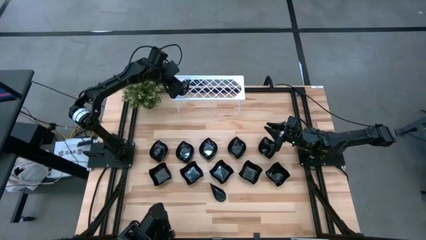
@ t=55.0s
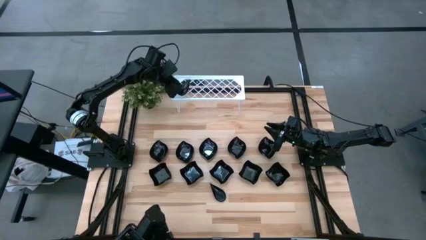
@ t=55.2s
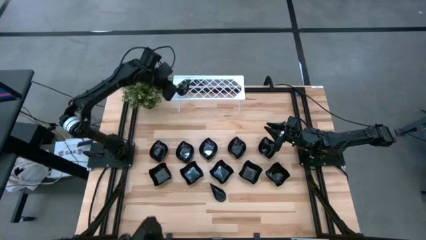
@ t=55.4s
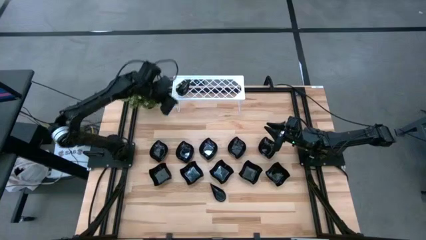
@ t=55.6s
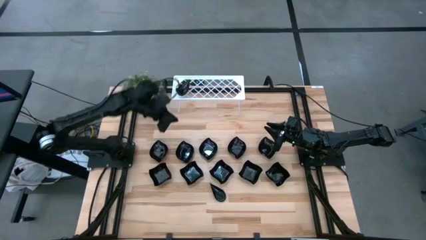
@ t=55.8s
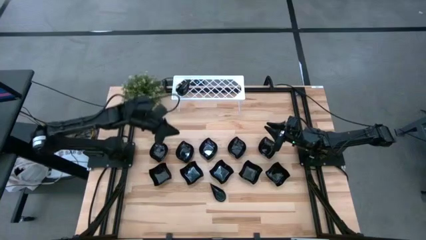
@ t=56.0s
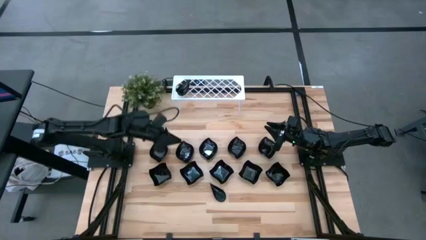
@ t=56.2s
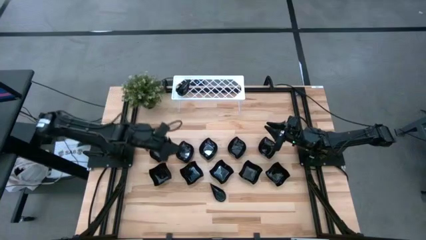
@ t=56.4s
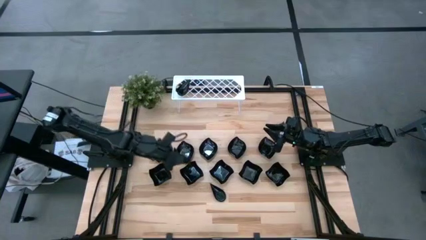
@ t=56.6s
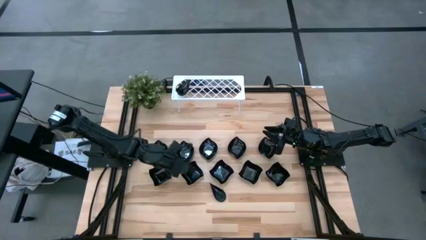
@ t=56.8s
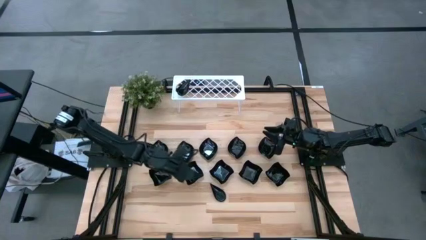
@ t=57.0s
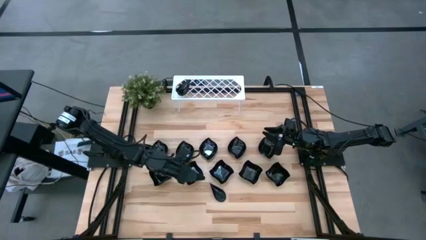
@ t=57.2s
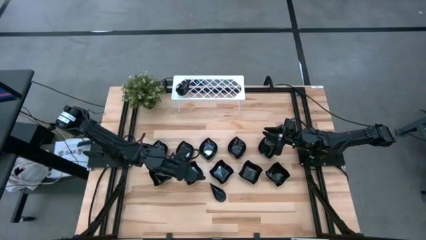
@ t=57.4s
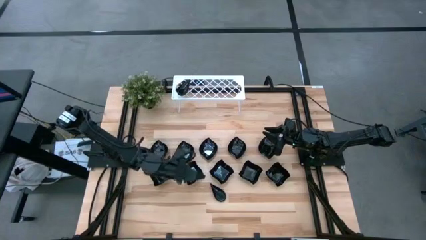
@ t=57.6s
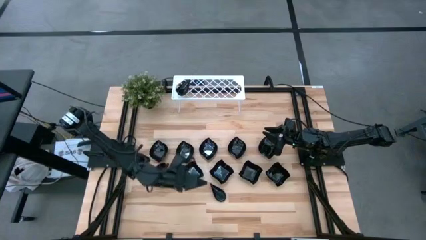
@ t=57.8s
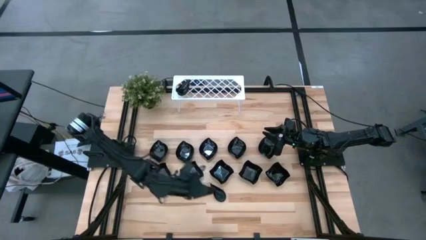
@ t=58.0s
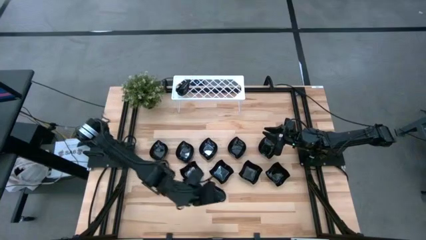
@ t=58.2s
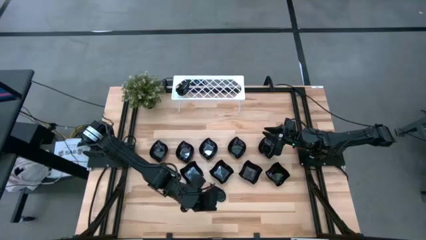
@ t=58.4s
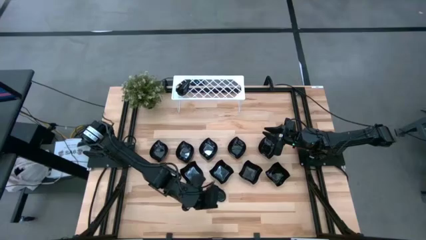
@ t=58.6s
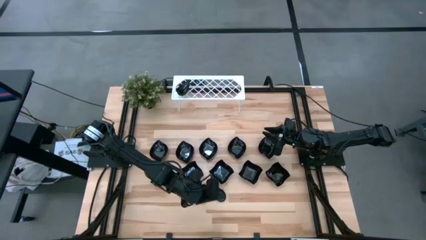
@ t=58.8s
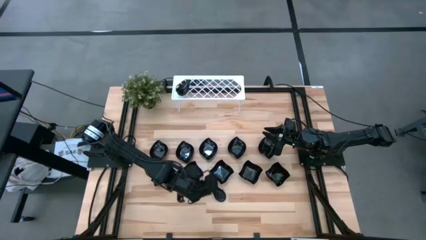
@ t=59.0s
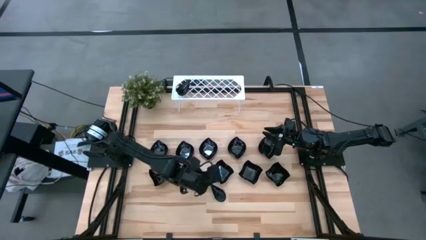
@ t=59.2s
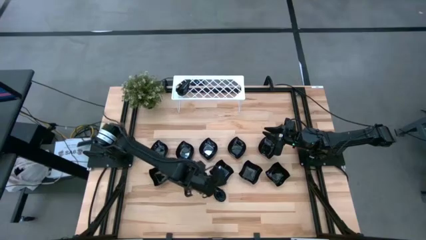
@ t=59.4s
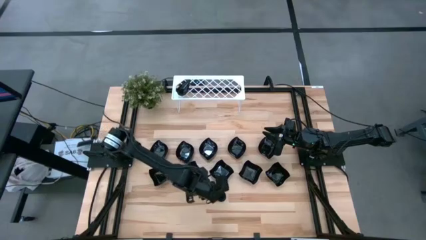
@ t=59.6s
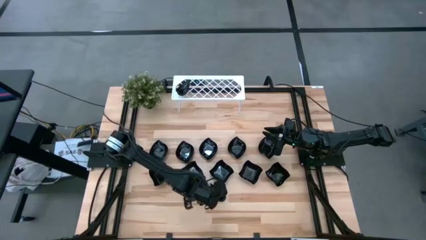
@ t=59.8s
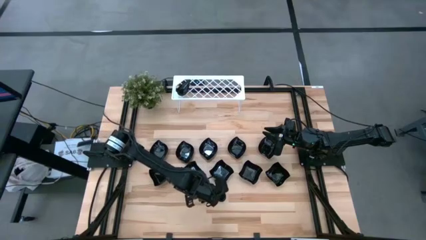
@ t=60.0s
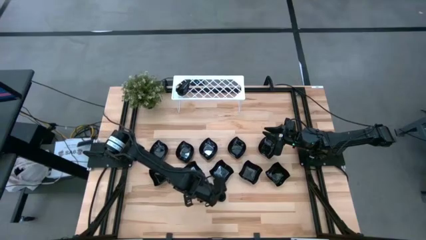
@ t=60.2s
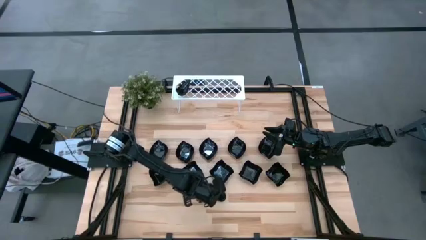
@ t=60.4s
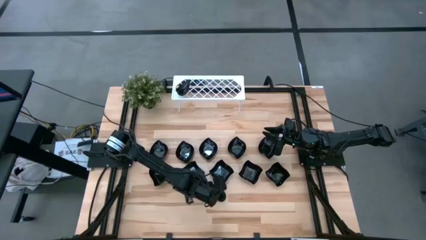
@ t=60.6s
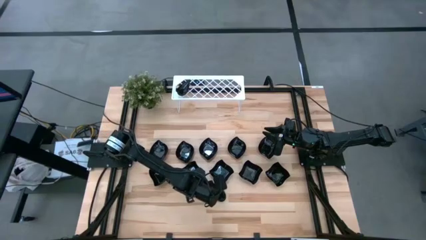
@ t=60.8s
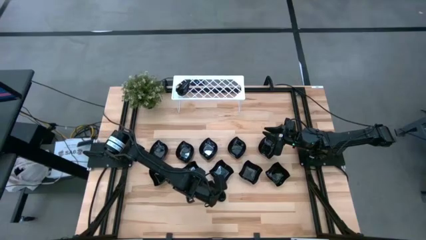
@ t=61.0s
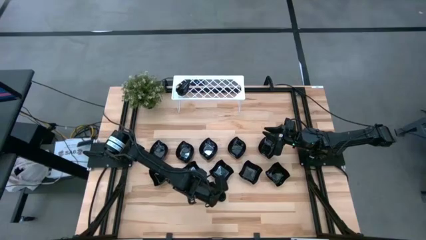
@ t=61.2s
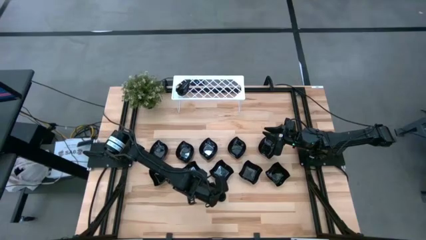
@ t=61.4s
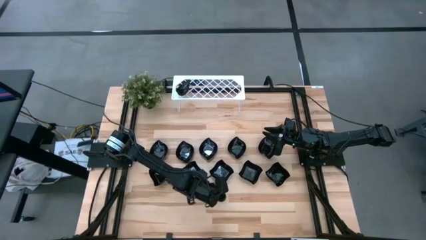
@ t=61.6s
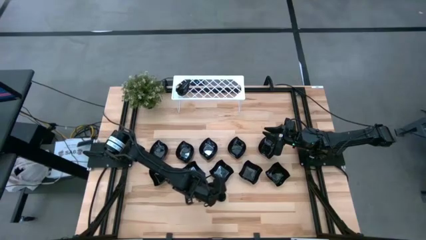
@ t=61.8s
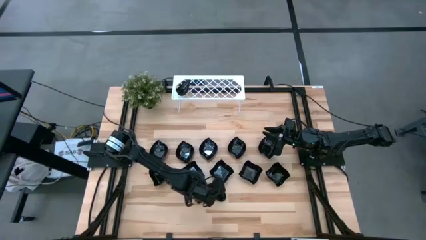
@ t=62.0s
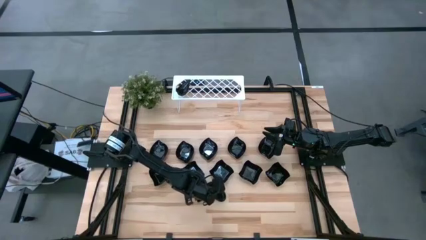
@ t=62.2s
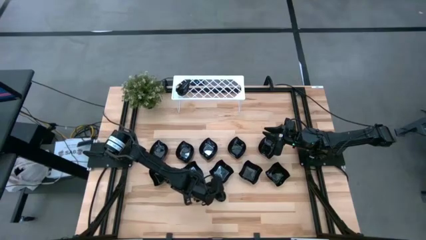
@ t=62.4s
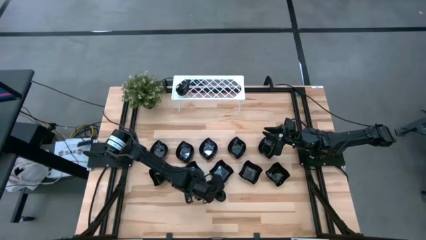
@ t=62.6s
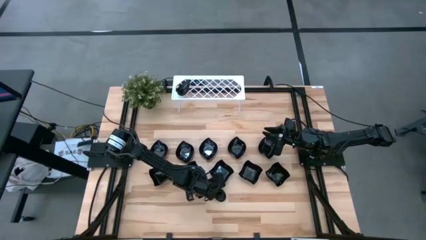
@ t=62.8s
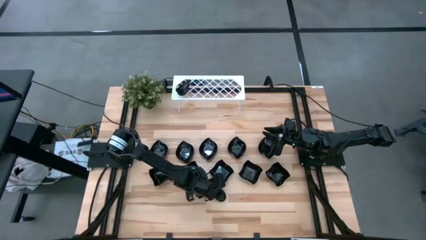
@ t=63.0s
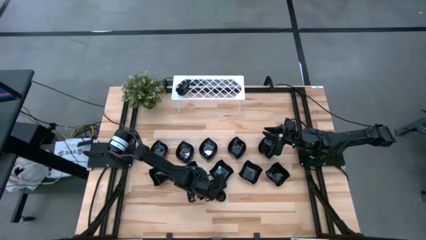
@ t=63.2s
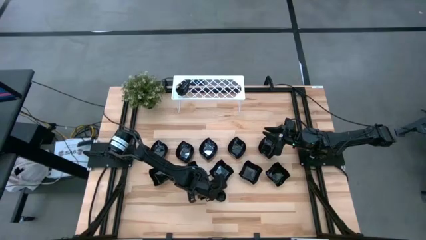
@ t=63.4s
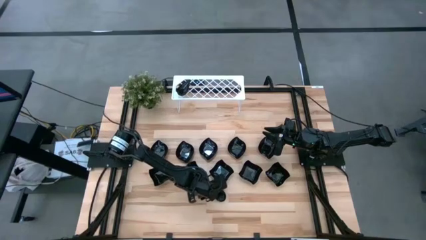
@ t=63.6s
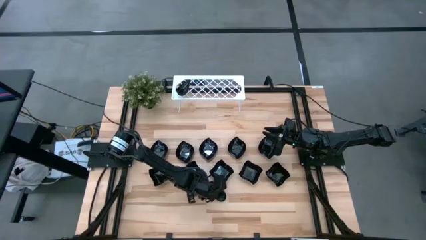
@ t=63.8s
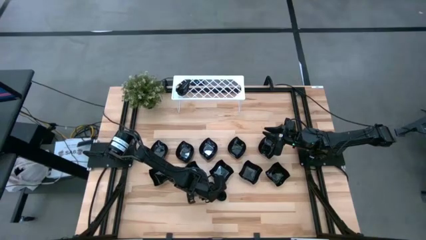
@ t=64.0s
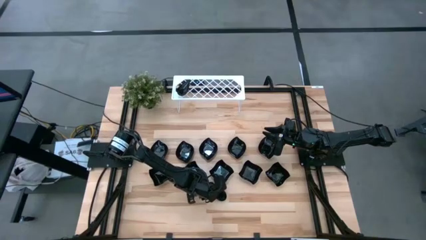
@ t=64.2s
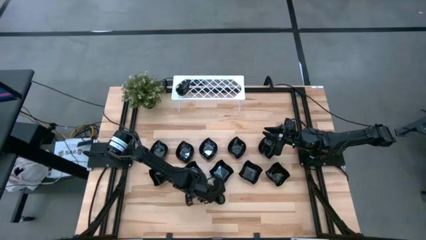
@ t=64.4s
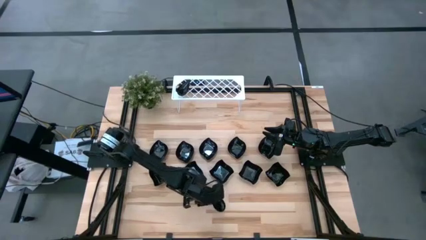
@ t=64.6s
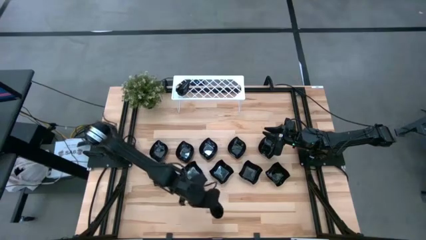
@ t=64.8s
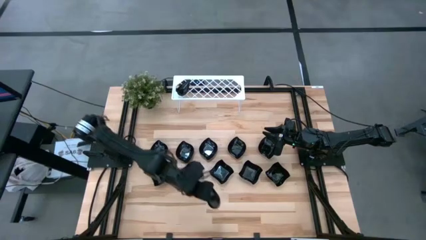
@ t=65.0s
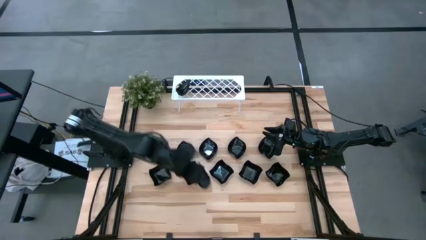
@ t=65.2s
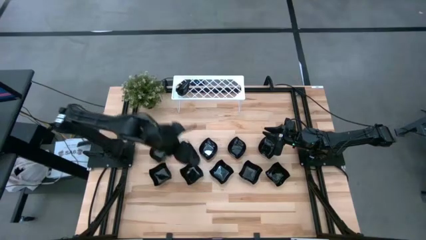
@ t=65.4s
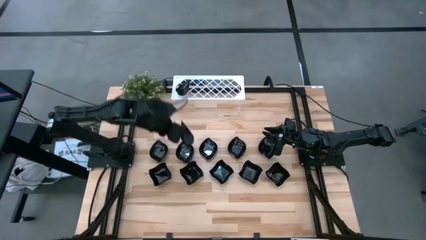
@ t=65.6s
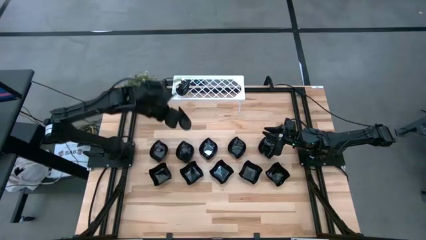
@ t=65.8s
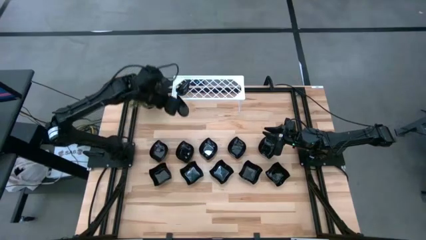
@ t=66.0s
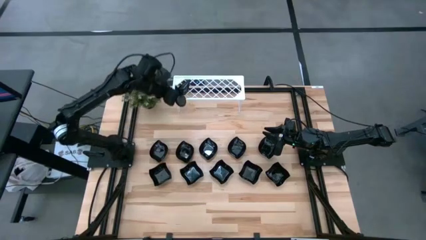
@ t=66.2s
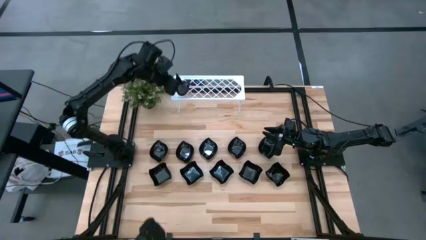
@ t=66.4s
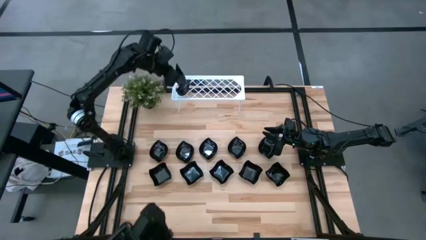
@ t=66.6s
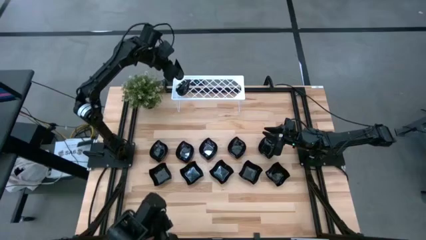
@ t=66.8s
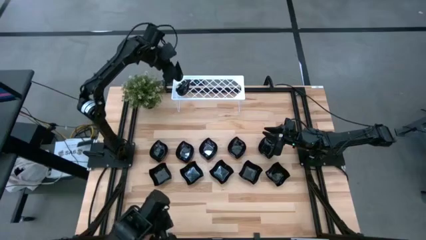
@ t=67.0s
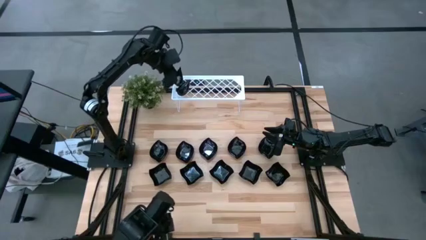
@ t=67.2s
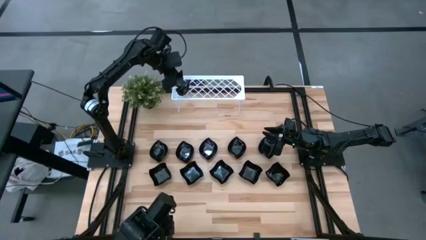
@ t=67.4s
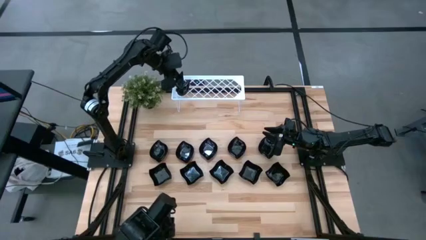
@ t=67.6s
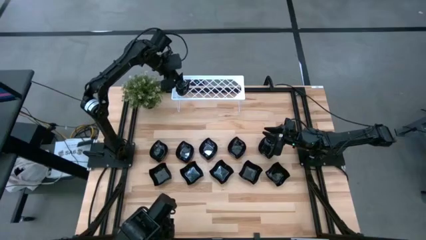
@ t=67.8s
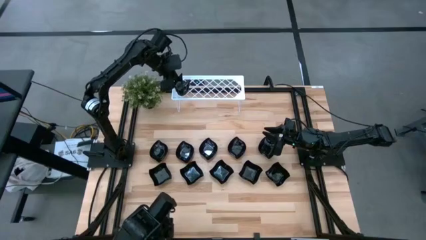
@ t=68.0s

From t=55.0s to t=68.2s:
Task: Pick & Place Mini shaped plates
Stack the black drop shaped plate on top of the black drop shaped plate on the shelf
